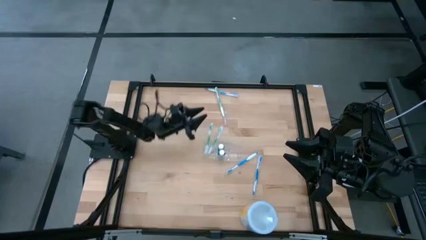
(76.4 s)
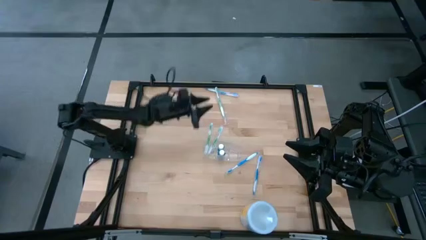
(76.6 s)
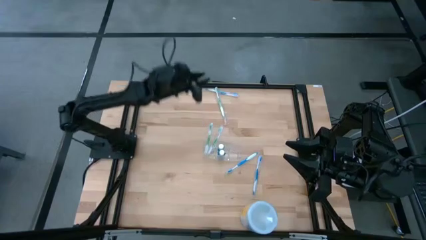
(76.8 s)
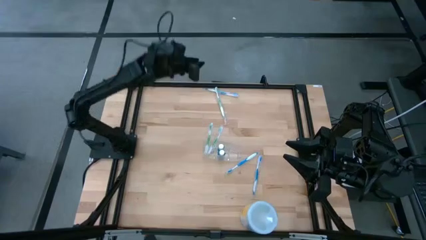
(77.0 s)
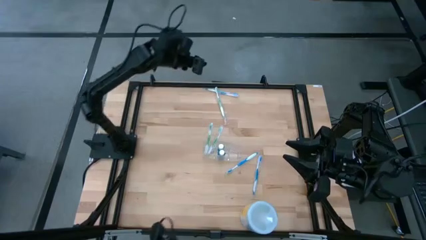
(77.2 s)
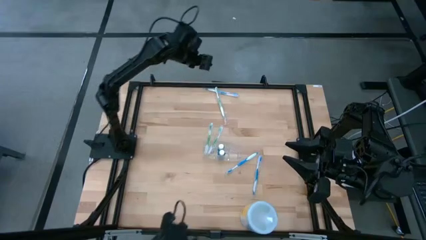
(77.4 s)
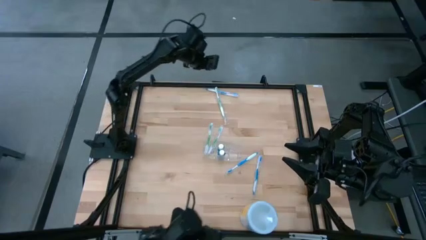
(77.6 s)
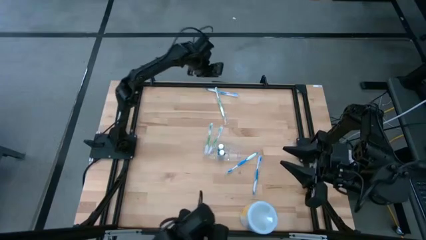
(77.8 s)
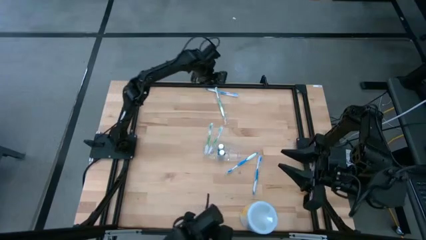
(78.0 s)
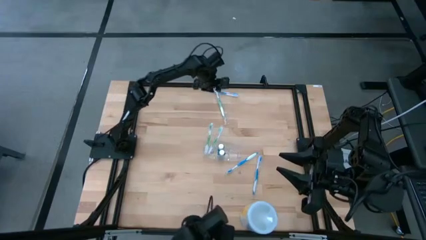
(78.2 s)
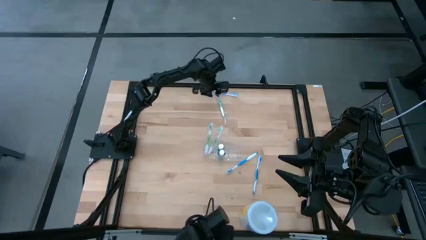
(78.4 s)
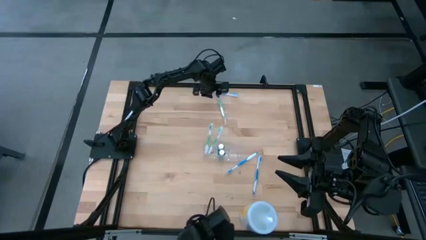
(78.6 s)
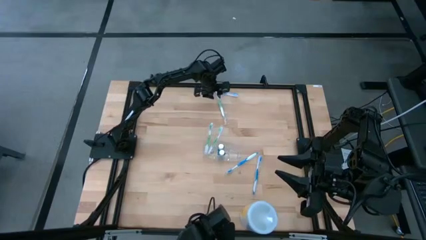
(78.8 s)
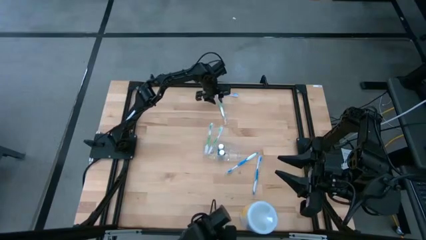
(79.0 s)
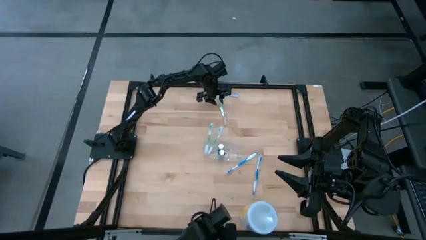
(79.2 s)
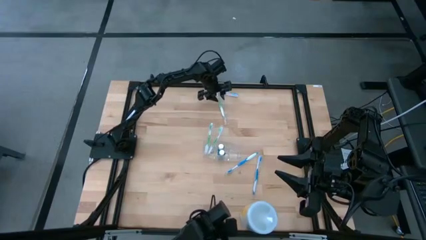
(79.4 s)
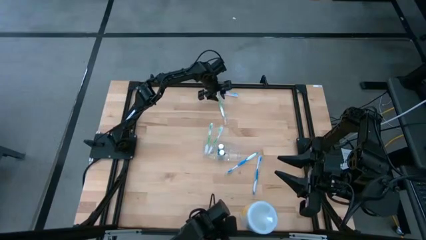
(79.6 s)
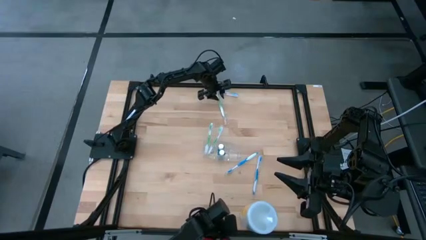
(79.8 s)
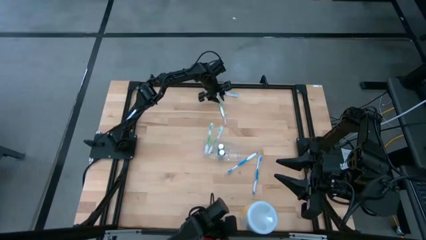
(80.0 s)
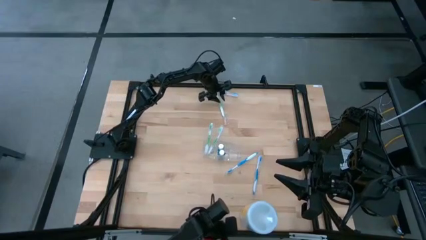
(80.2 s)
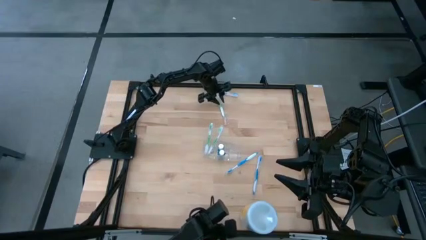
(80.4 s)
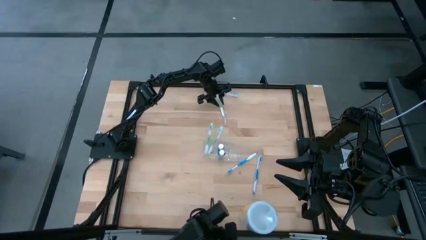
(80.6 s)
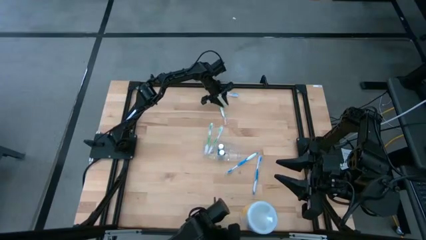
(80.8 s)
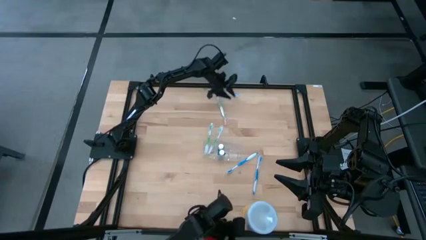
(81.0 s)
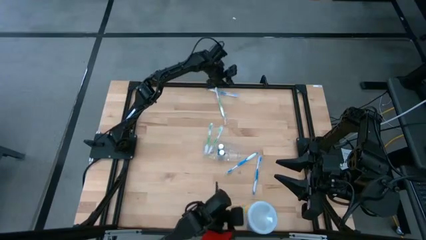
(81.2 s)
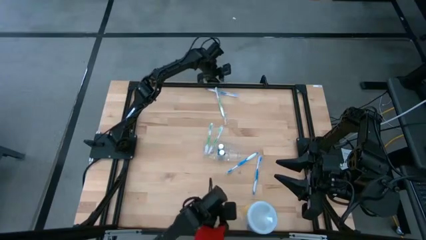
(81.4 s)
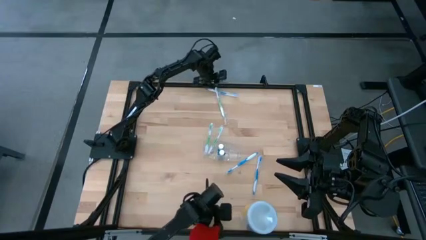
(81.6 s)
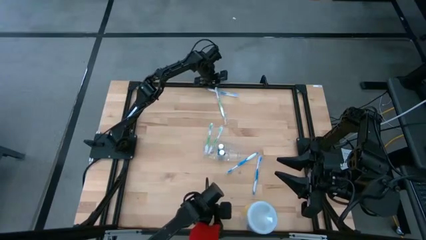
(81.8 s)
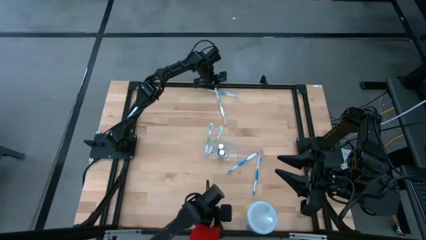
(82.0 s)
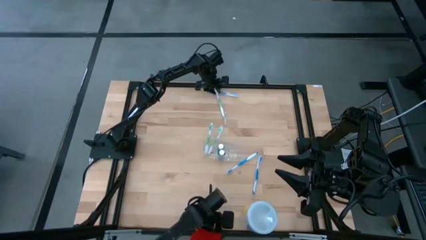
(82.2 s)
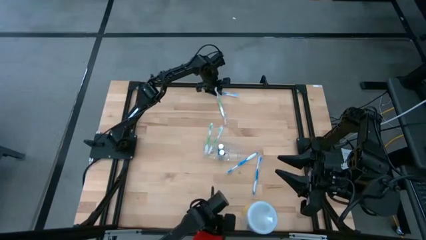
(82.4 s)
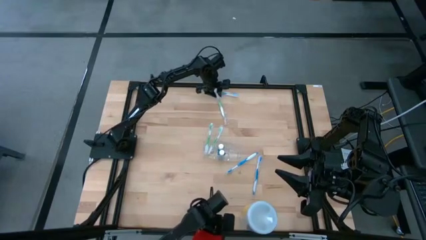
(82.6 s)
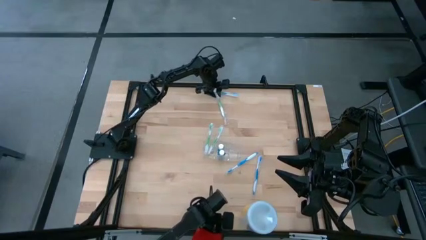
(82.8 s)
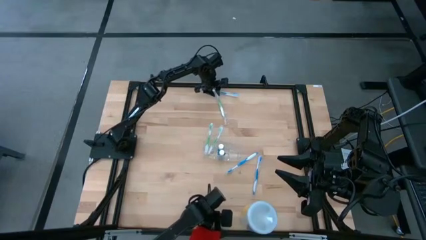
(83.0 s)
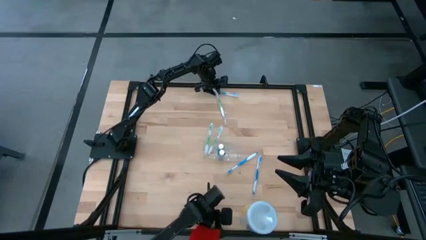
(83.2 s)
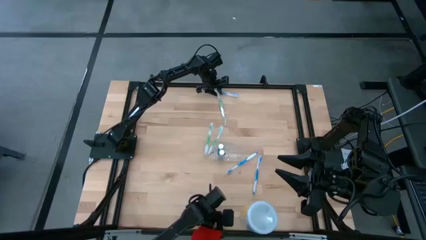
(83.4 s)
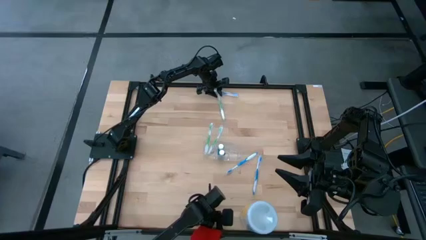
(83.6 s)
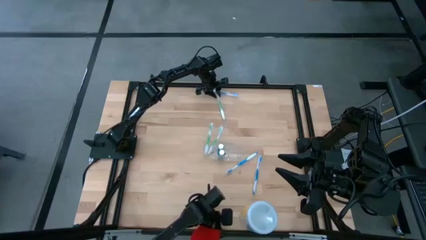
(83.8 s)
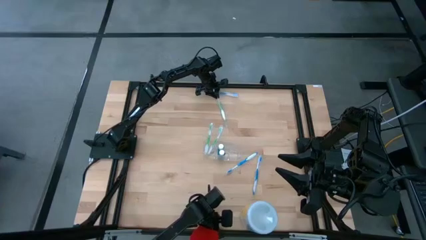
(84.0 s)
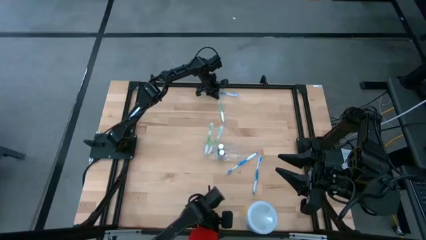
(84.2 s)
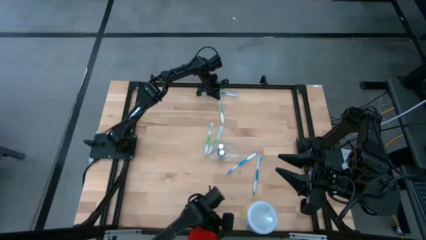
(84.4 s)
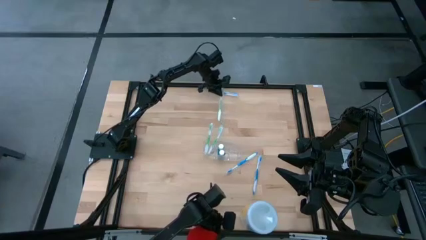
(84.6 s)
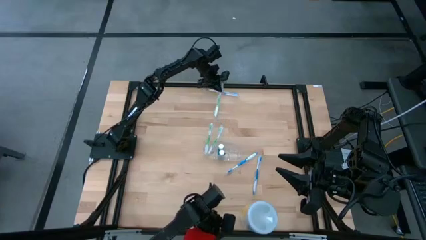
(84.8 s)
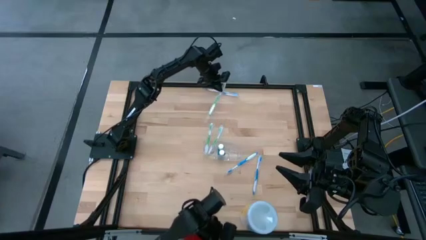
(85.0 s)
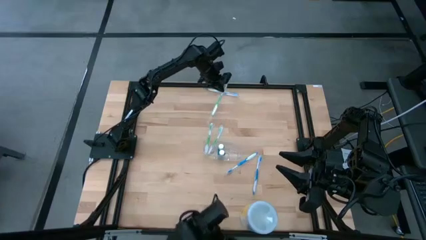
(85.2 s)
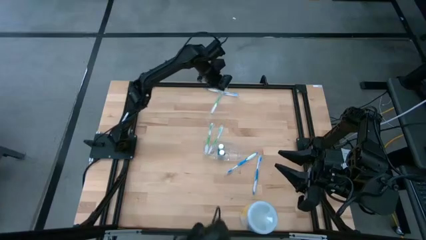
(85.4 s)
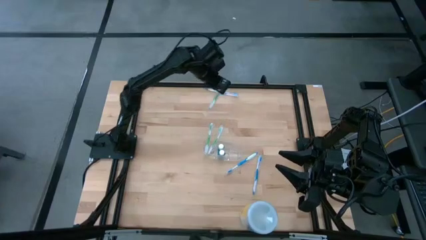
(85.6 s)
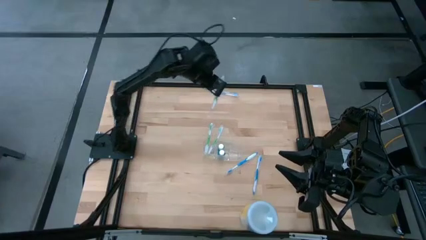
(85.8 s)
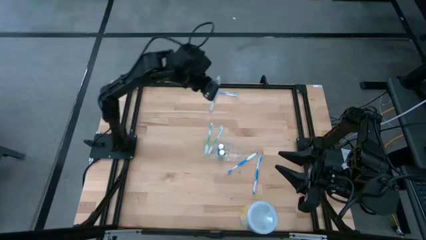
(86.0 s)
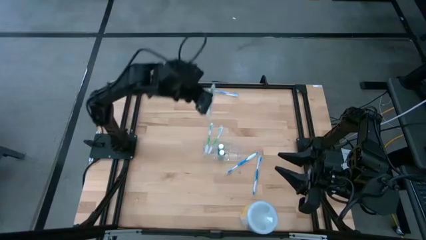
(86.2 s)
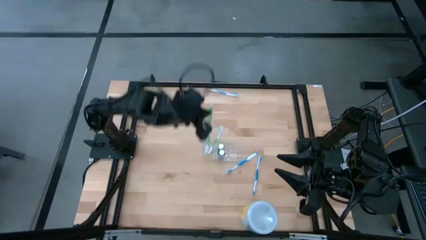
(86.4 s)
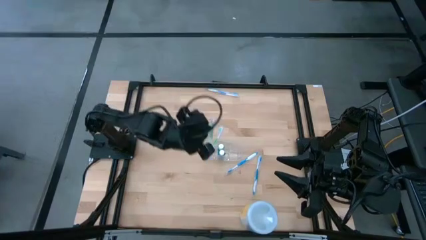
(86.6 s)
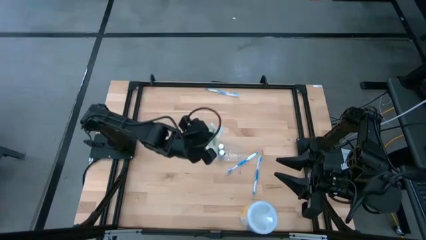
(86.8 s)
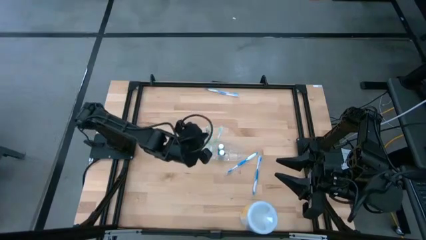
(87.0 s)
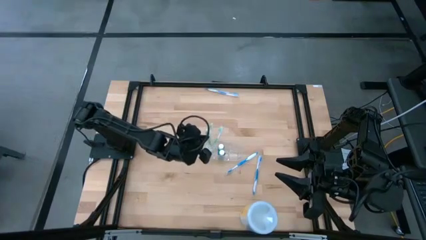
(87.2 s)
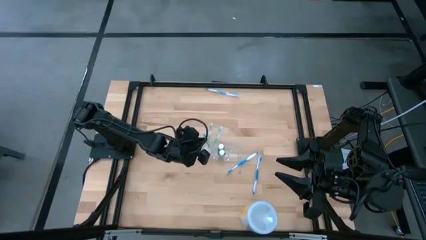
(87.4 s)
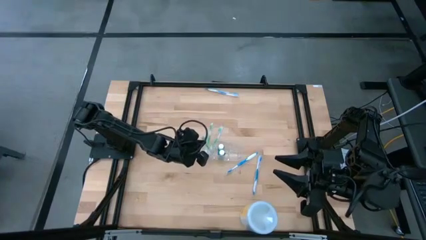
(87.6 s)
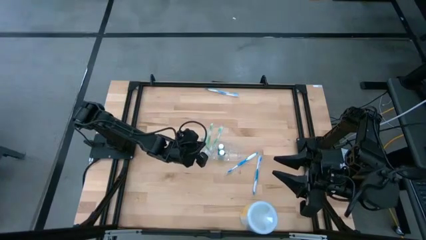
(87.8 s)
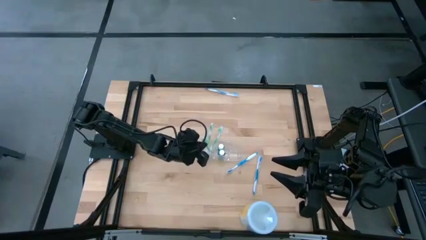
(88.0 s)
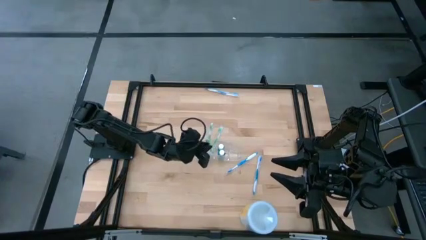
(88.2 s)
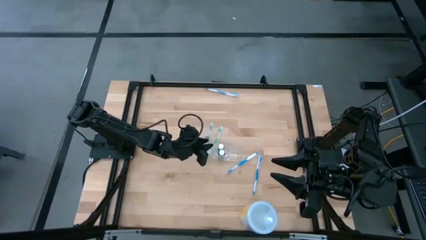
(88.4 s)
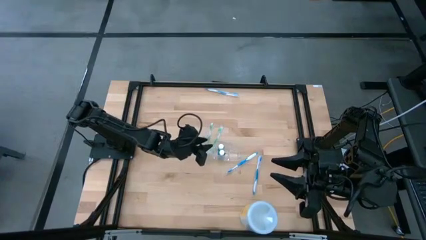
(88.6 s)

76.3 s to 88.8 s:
Task: Pick & Place toothbrushing station
Put the green toothbrush into the transparent organizer

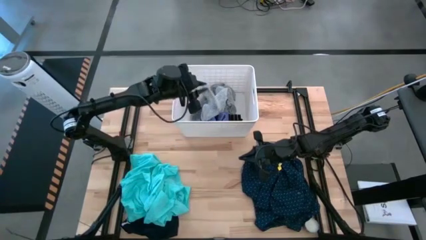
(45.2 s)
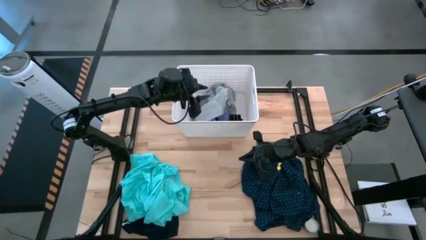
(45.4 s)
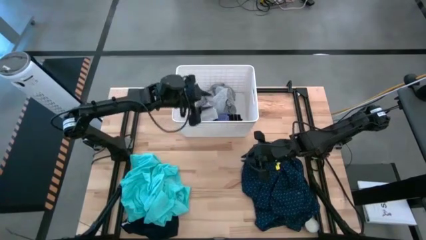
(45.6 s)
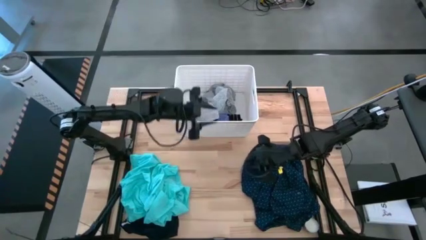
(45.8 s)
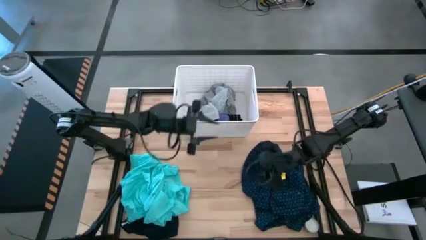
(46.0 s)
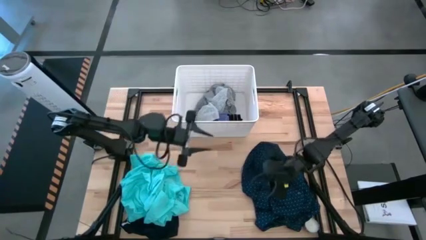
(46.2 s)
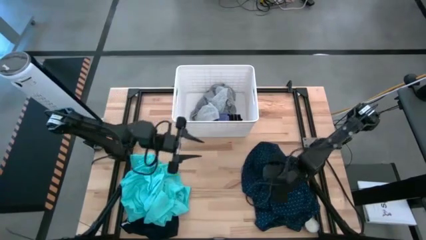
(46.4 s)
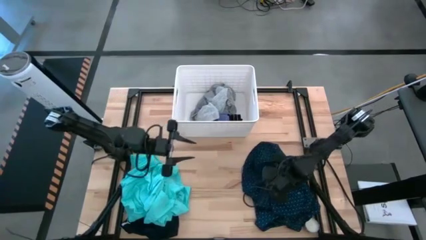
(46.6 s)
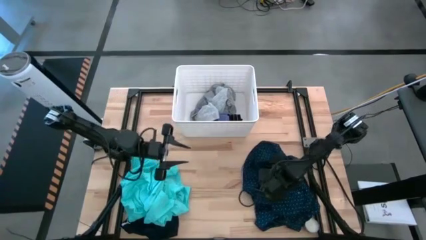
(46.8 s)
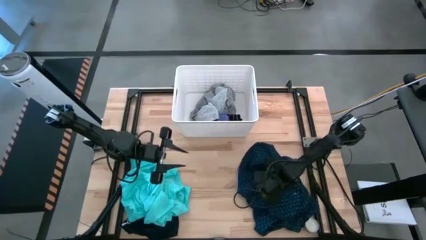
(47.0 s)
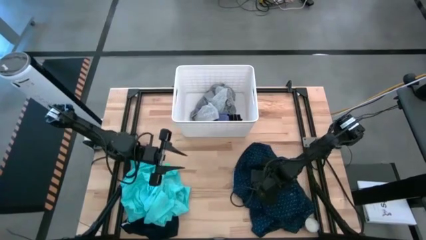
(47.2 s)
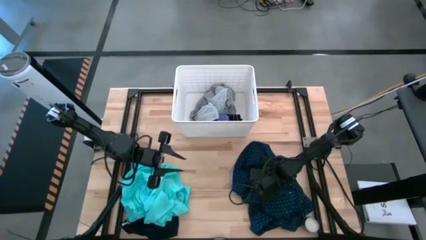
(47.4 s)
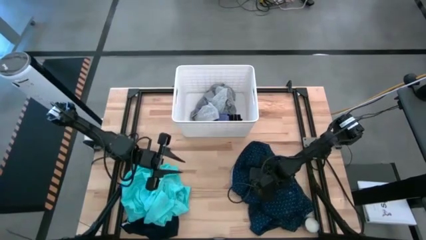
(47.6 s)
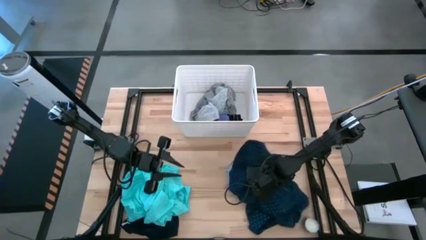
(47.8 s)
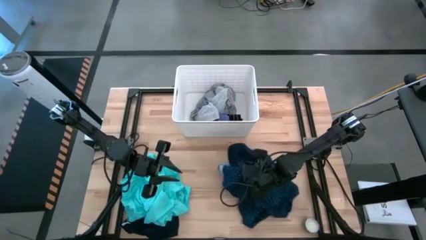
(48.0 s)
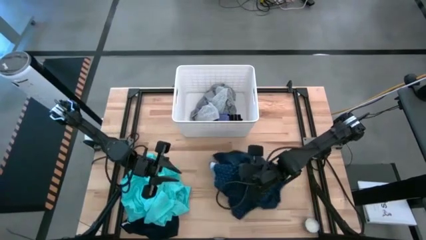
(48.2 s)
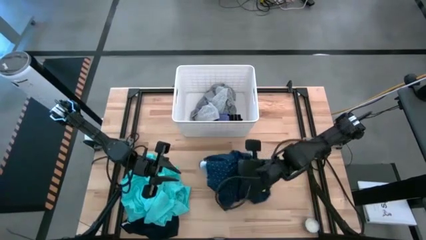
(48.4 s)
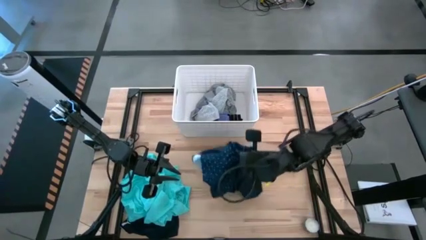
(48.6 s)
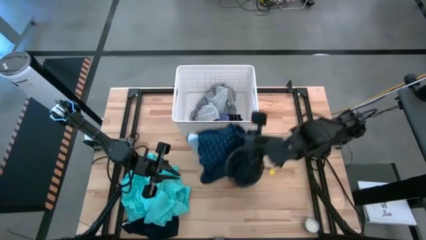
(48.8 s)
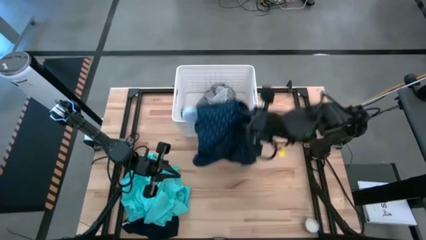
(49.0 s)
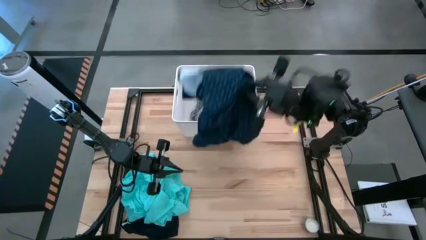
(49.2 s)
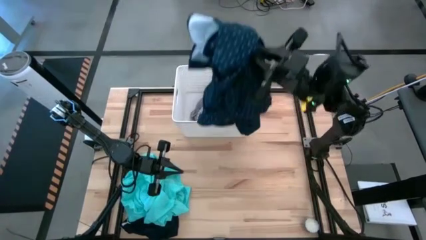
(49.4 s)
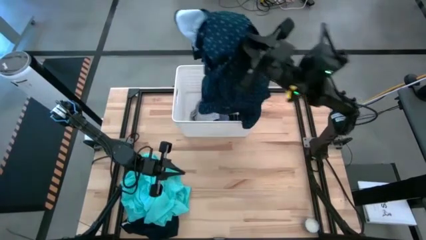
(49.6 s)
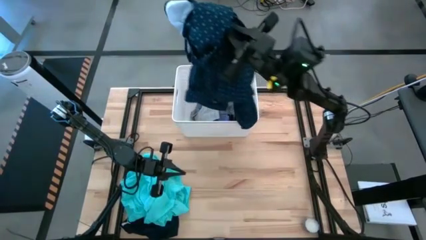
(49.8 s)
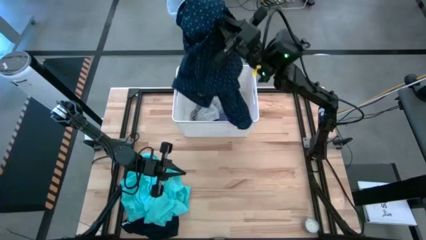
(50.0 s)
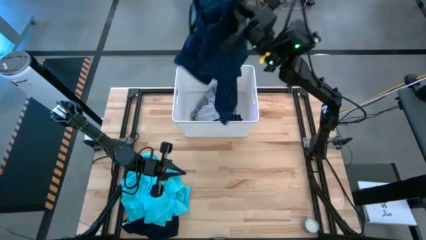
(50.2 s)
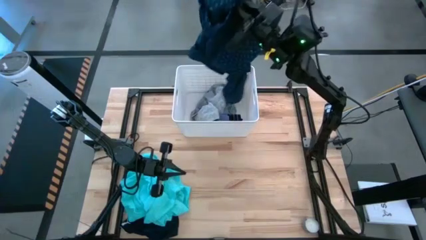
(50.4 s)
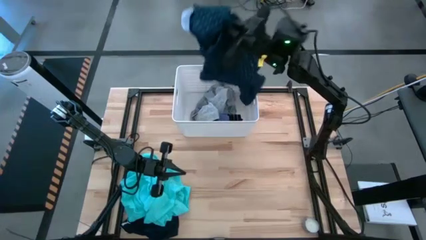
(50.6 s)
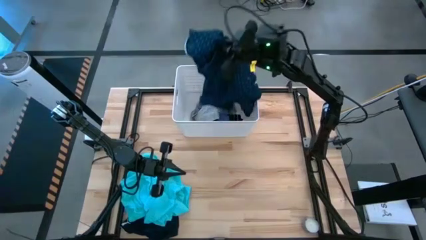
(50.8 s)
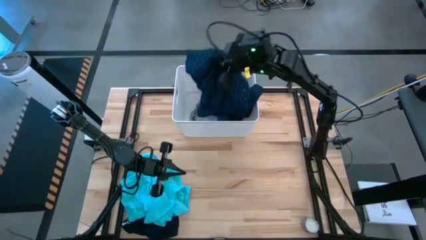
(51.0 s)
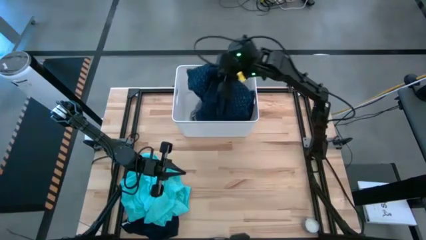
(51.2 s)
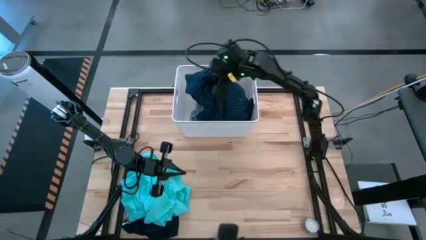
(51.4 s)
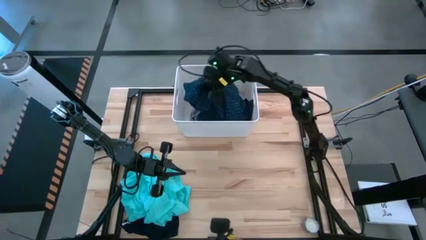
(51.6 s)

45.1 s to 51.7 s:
Task: Sort clothes
Put the blue shirt into the white laundry bin
